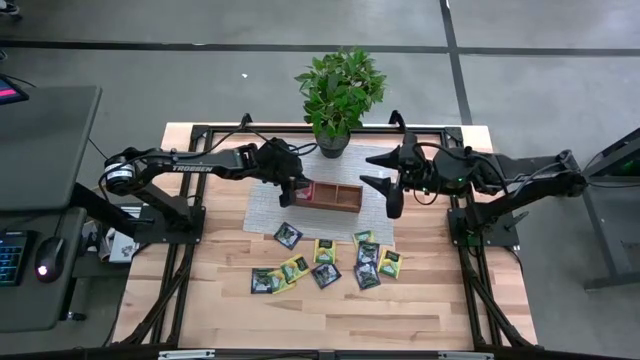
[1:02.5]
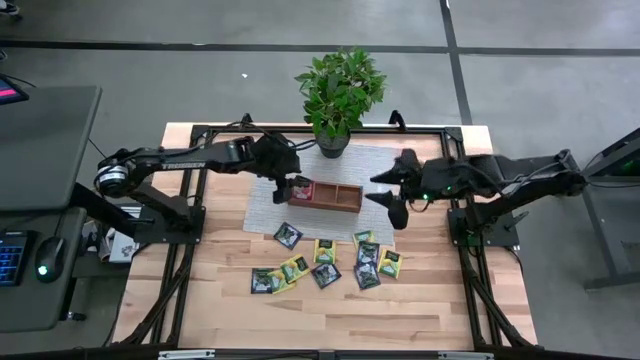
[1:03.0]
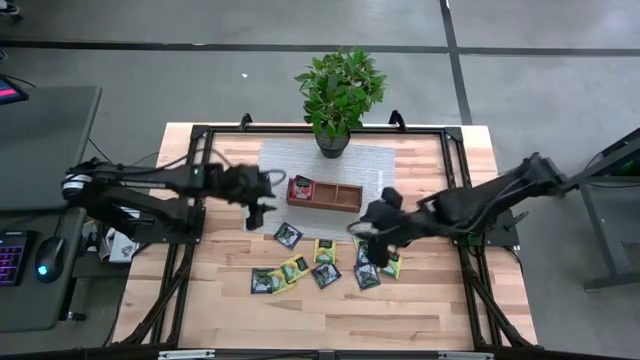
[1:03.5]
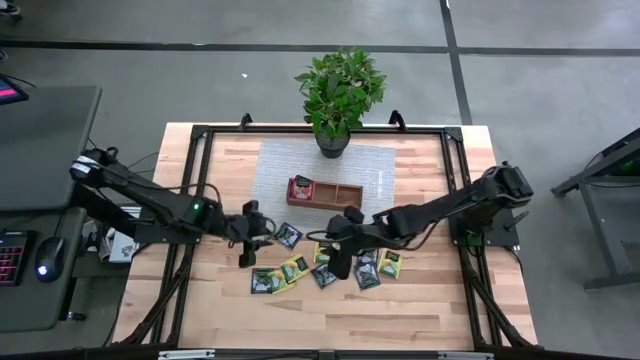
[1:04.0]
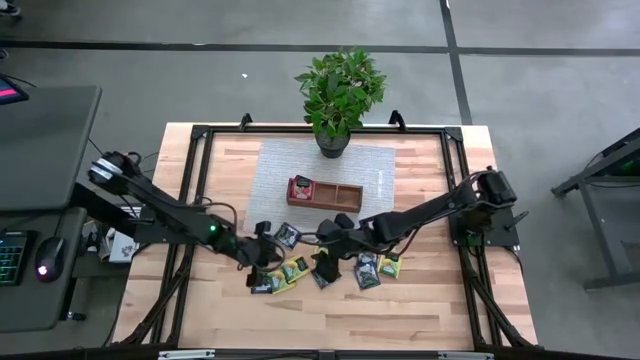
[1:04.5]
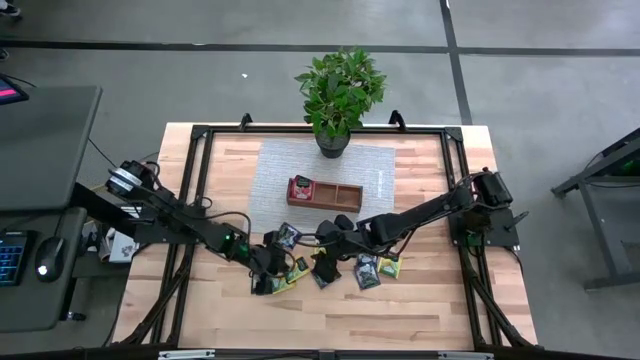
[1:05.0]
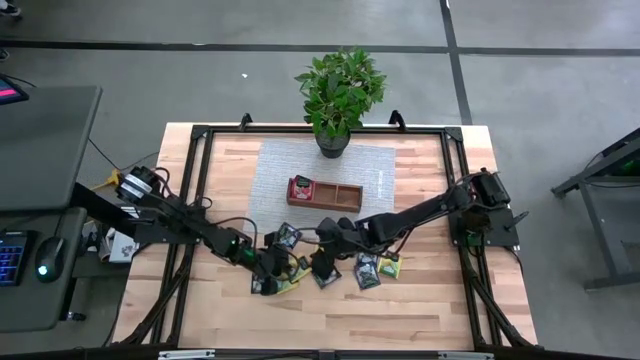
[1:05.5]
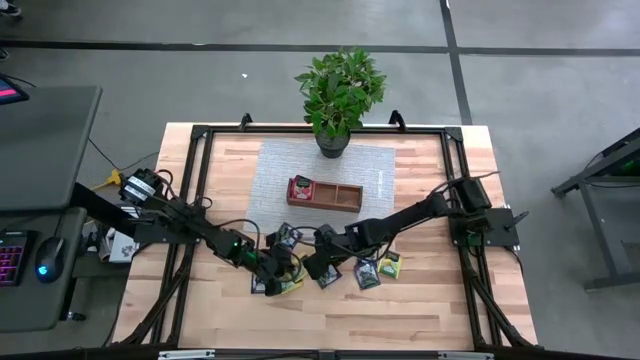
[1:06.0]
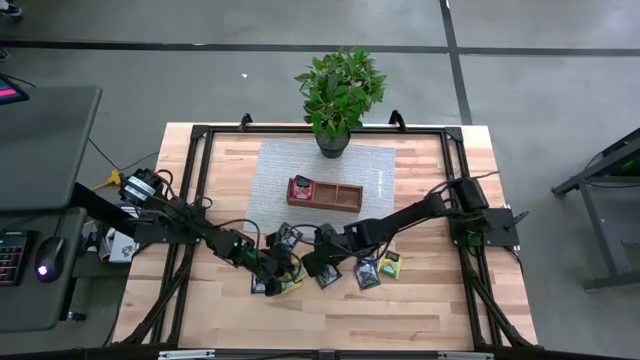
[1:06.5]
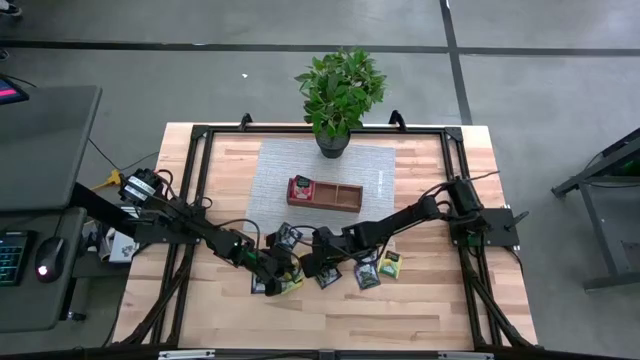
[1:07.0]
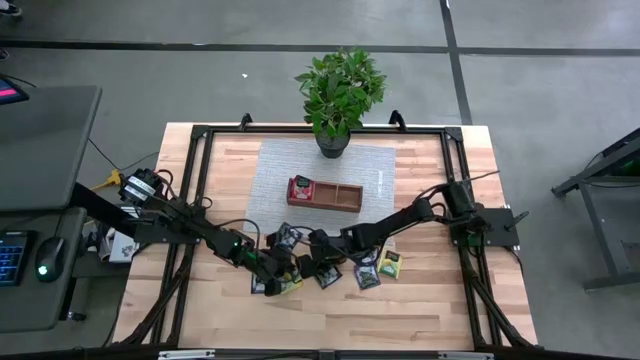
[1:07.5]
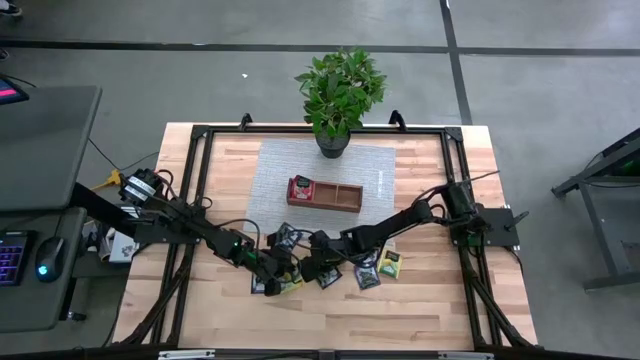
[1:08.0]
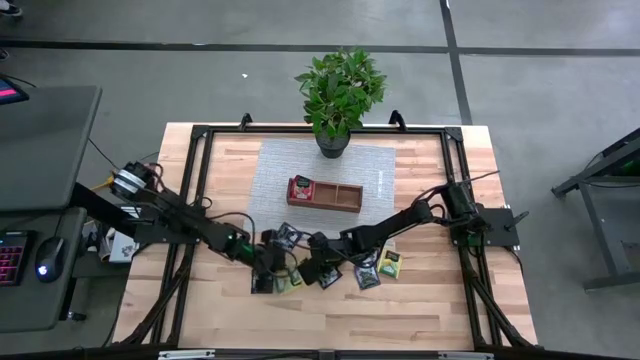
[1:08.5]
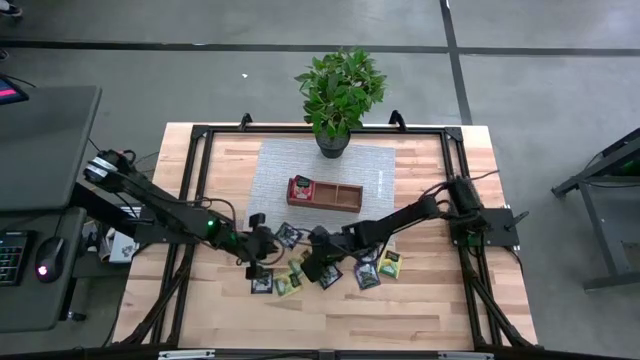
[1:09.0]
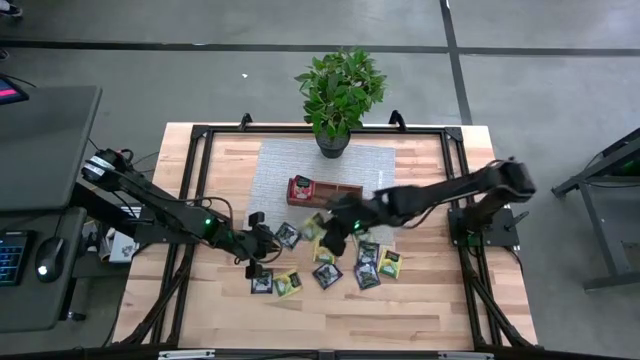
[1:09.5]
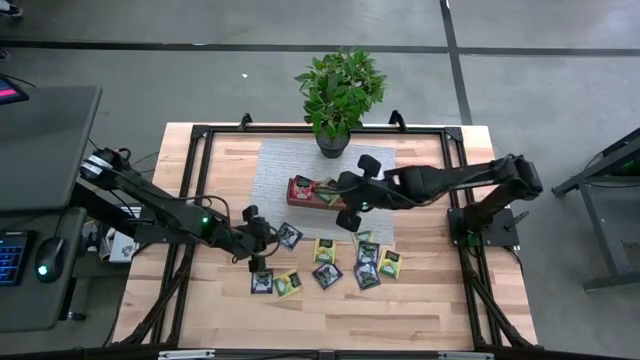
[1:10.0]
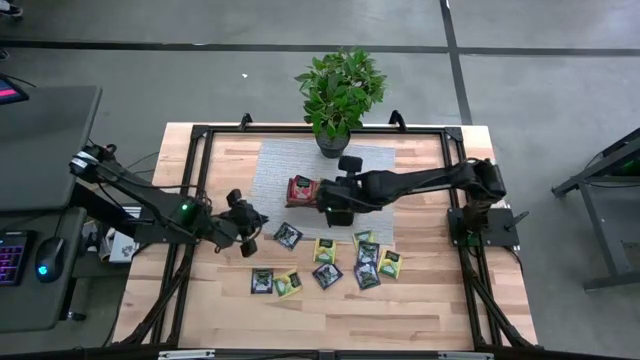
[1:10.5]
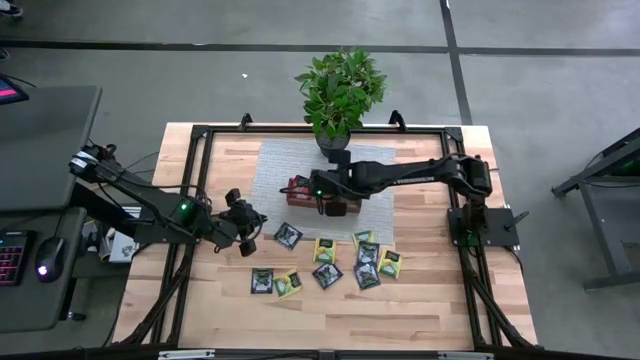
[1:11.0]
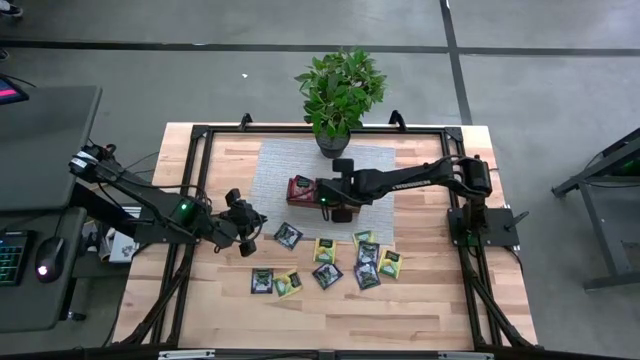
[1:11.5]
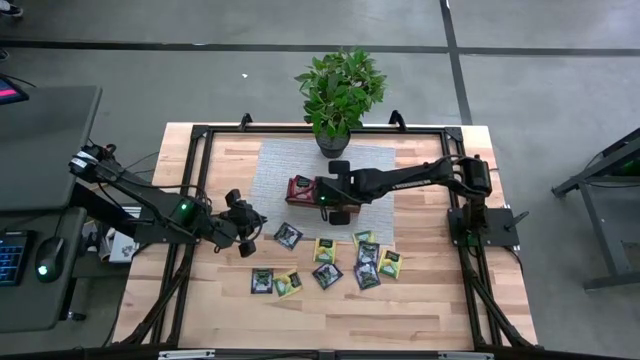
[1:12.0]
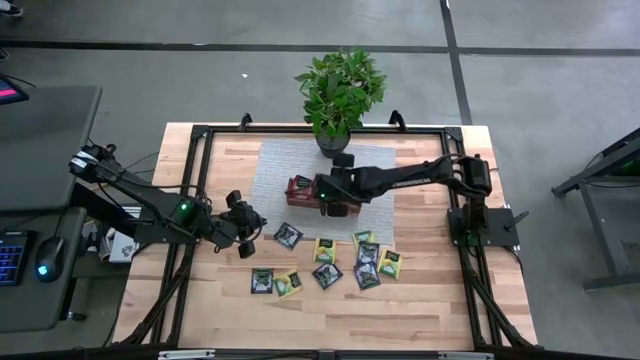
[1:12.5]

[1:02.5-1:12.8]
Task: Pick & Place Tea
Put the yellow tea bag into the middle section of the wooden organizer

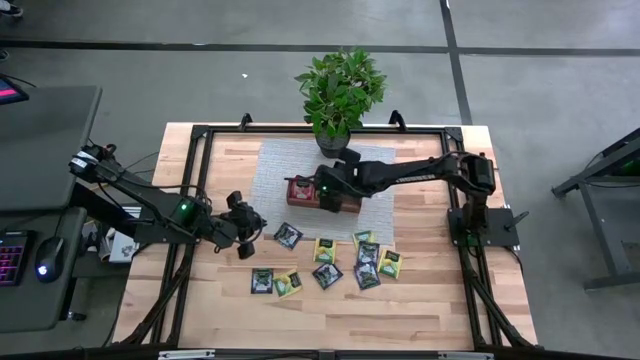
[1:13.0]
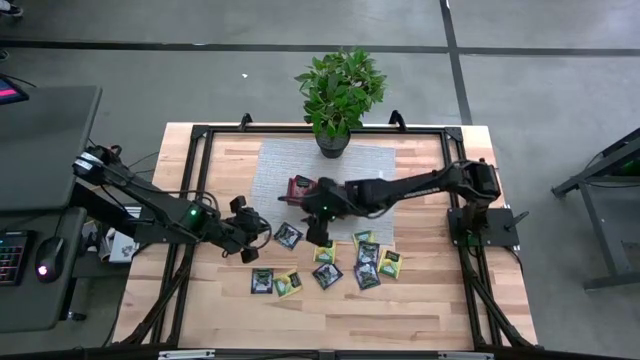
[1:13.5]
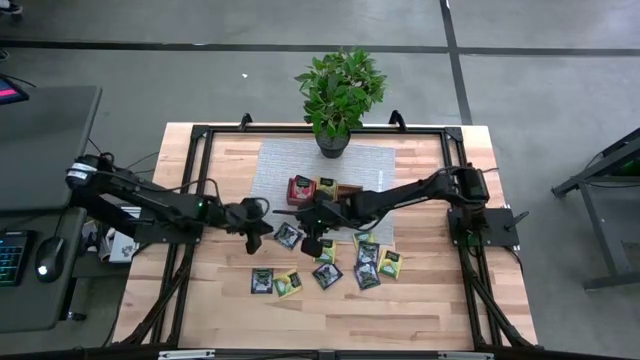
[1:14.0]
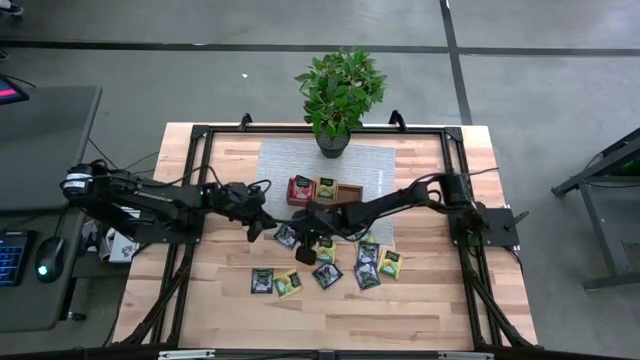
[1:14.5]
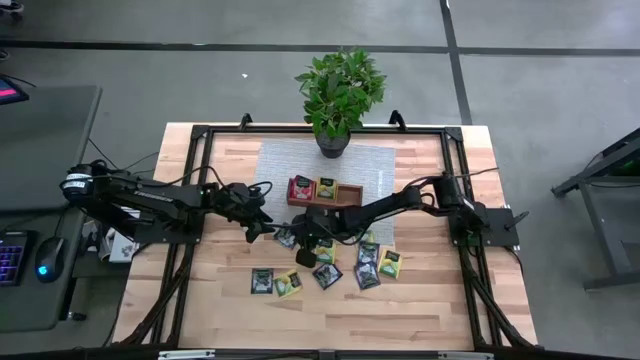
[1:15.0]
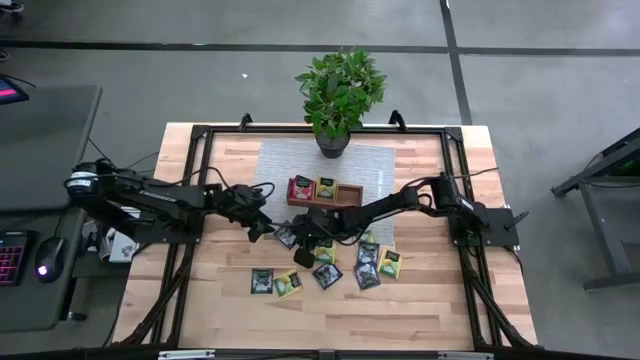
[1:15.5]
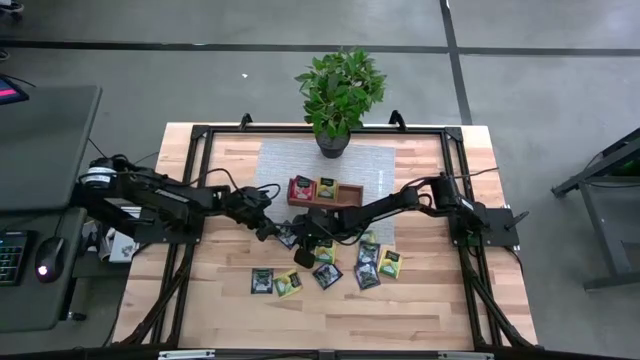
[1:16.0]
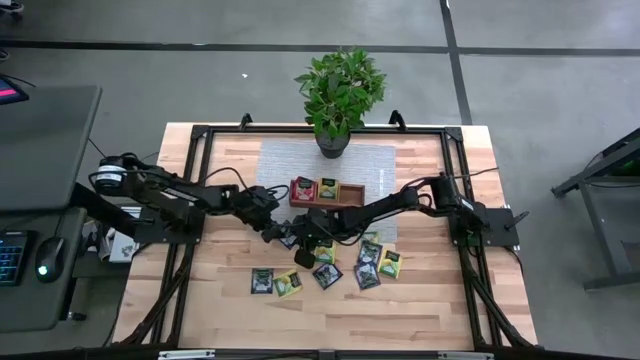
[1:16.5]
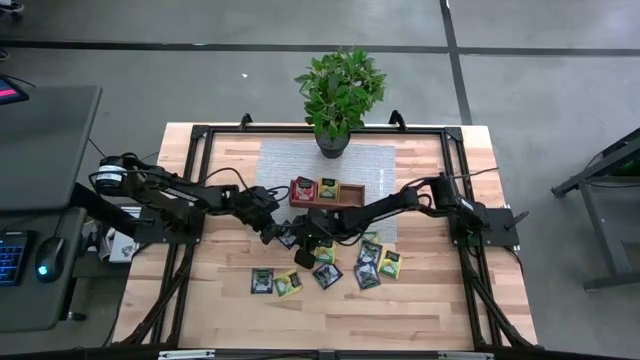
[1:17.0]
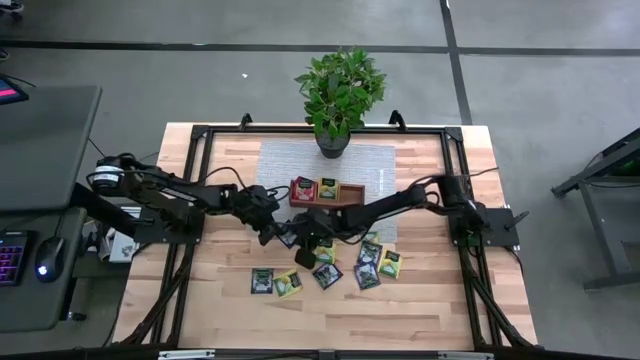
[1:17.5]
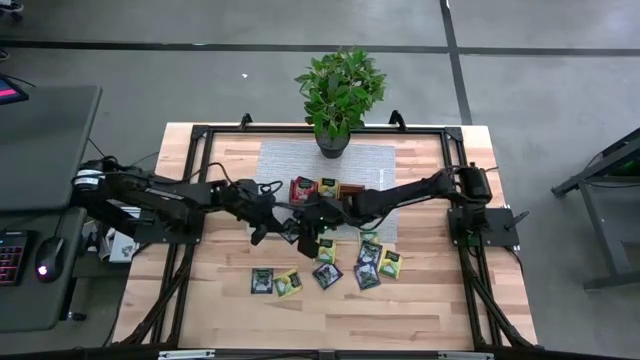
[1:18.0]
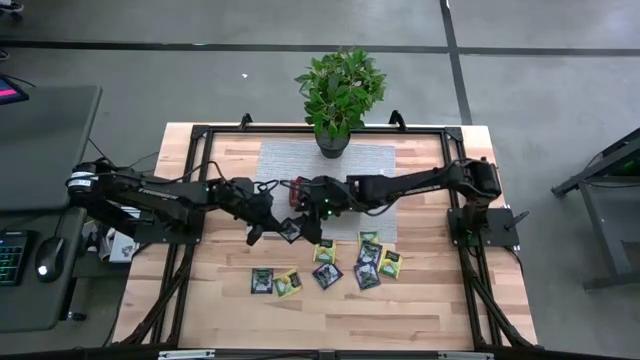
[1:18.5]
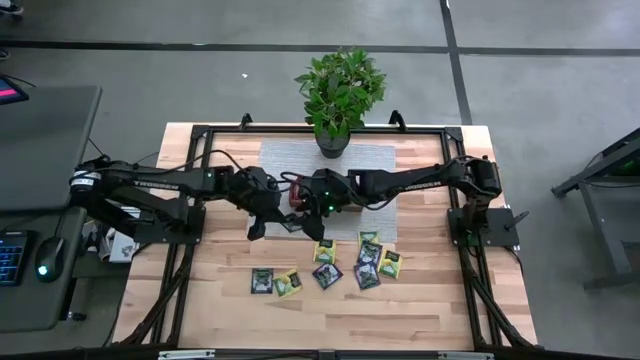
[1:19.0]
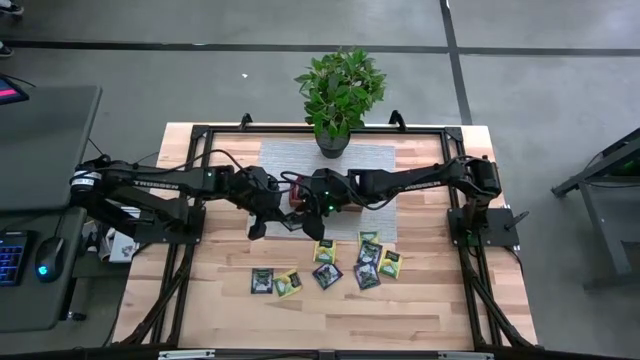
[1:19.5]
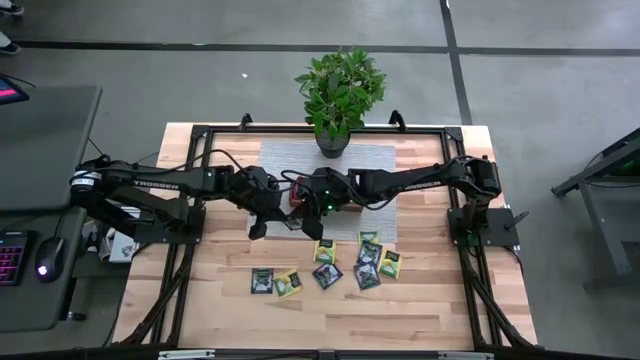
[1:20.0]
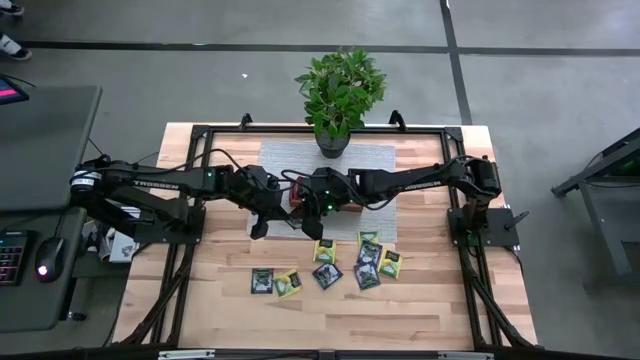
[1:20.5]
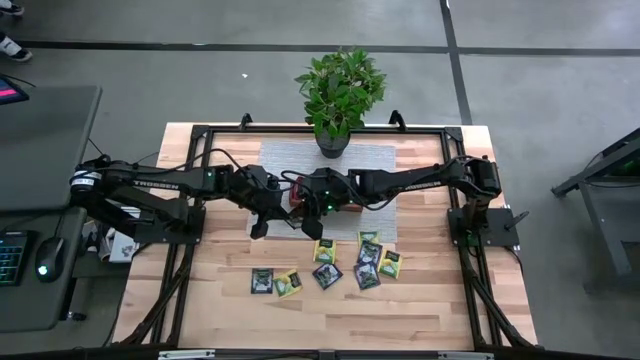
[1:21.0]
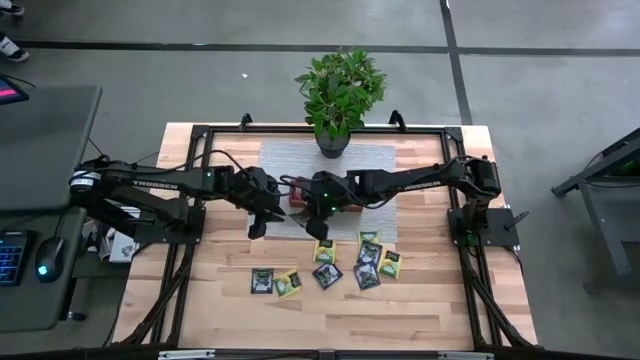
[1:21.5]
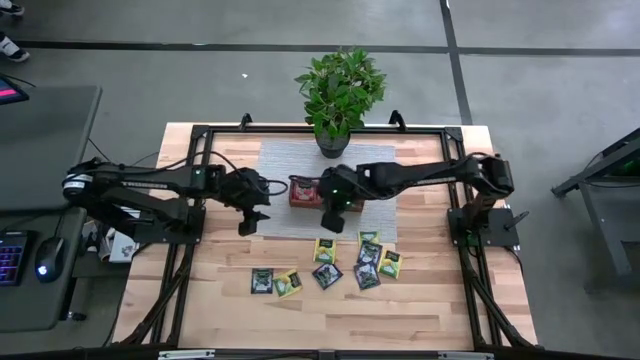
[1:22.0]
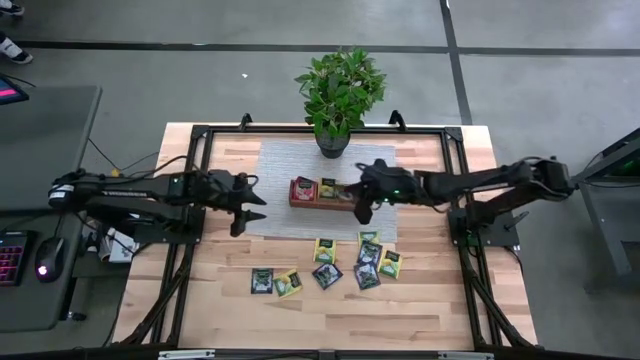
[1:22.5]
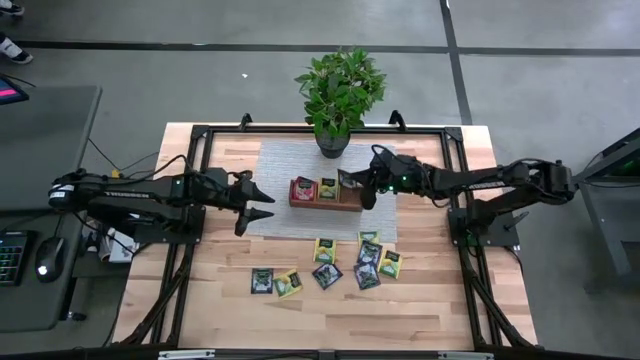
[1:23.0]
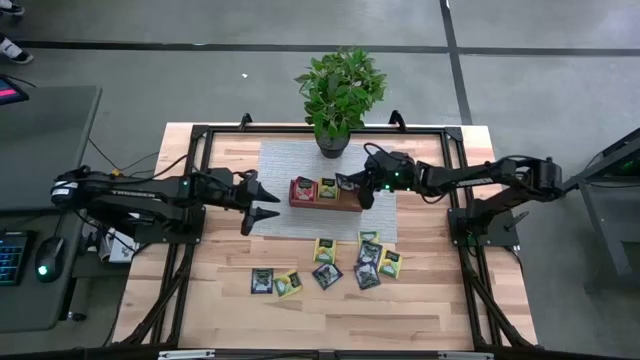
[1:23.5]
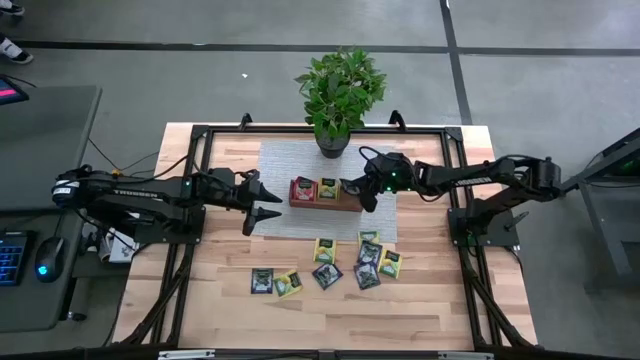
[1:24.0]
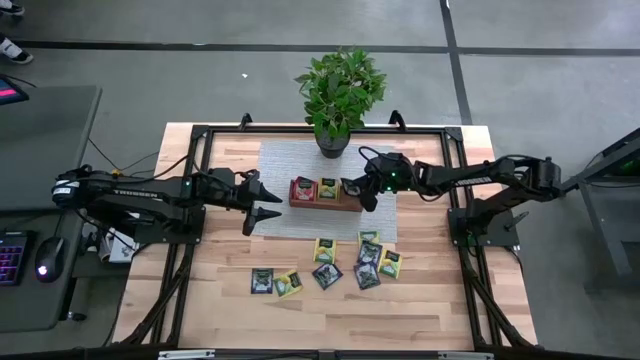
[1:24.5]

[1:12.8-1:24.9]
Put the violet tea bag into the right section of the wooden organizer
